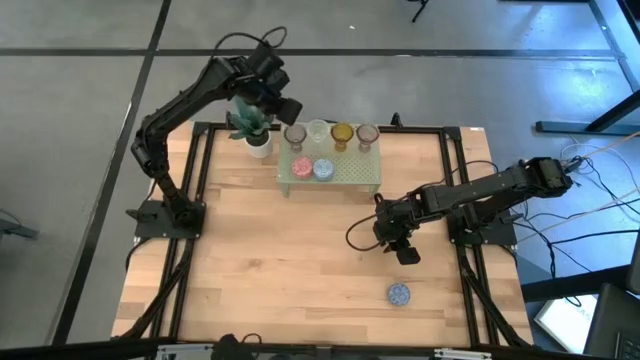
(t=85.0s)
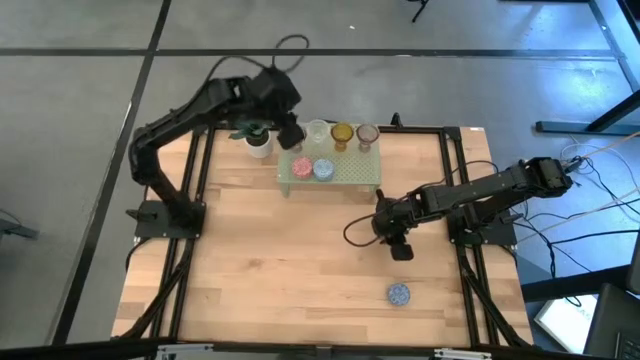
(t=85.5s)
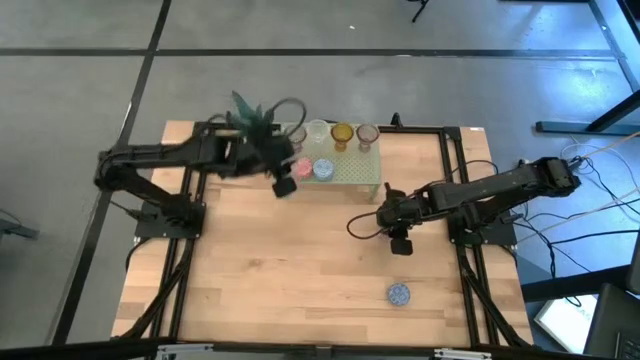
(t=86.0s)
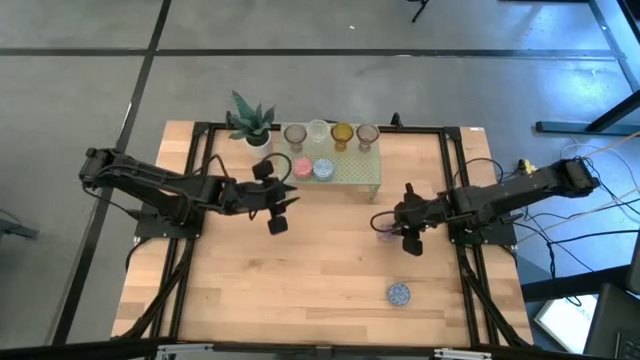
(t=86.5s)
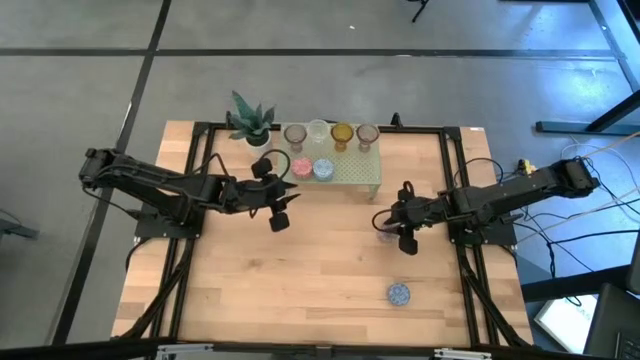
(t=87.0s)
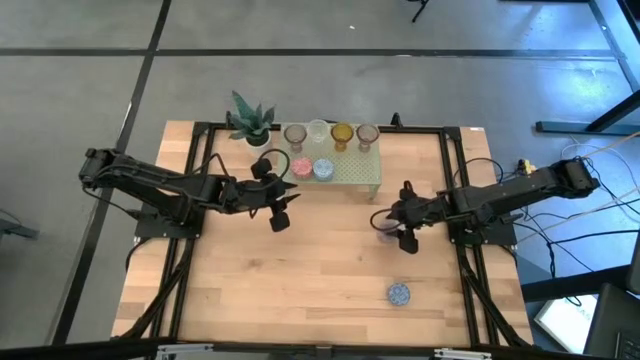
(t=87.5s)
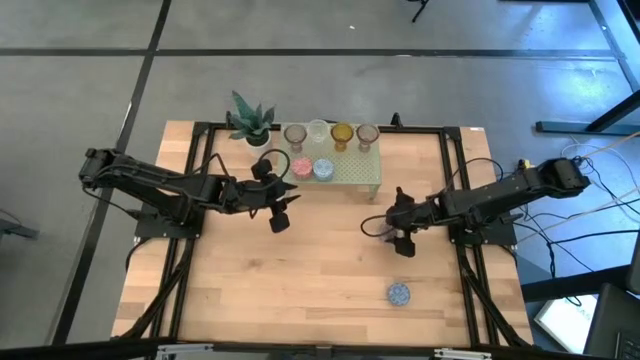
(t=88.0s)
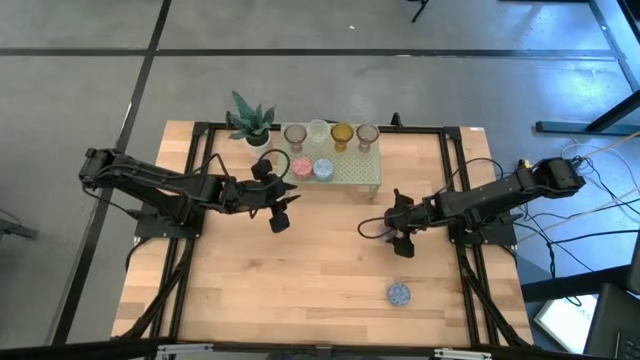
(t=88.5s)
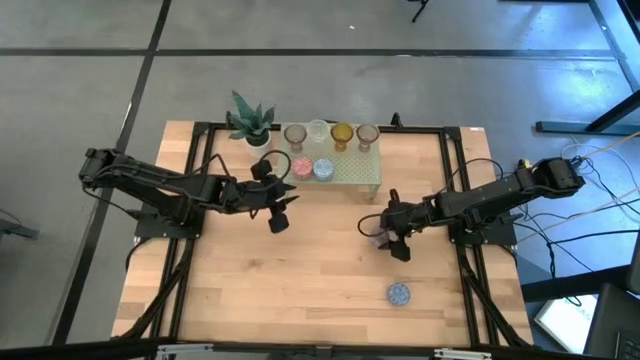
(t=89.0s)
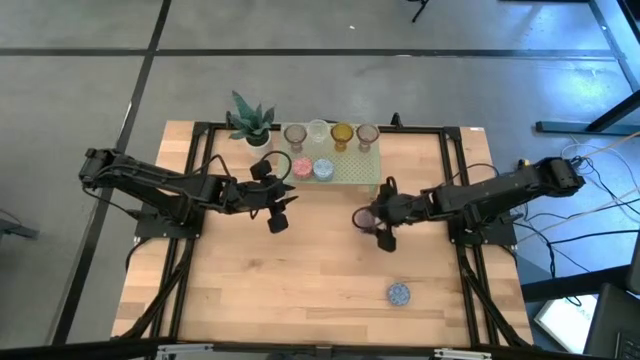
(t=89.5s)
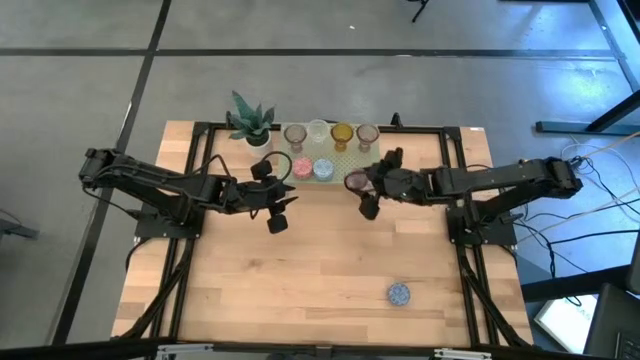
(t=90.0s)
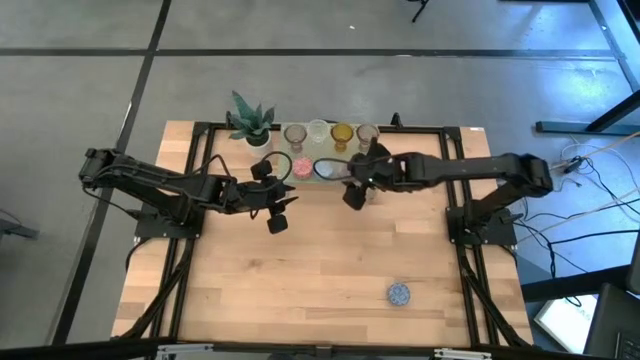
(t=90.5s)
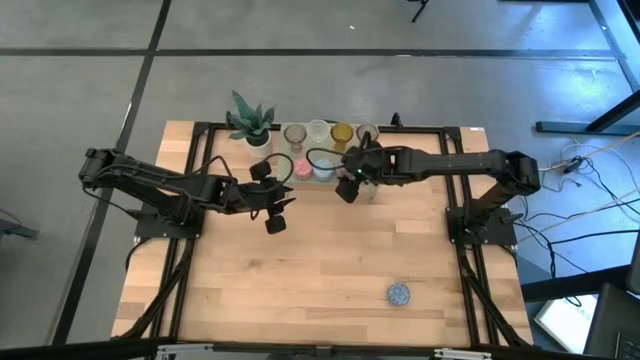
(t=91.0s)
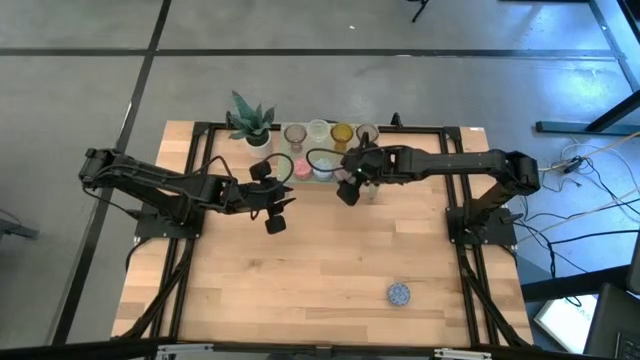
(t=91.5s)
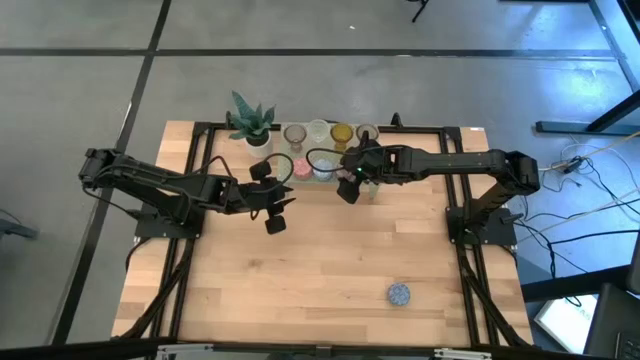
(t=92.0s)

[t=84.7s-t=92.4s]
Task: Pick & Place candle stick holders
Put the red scented candle on the shelf

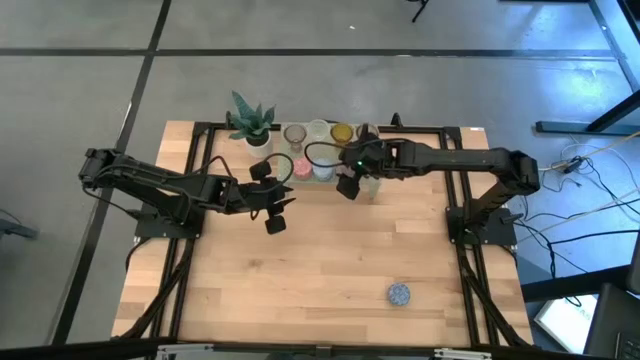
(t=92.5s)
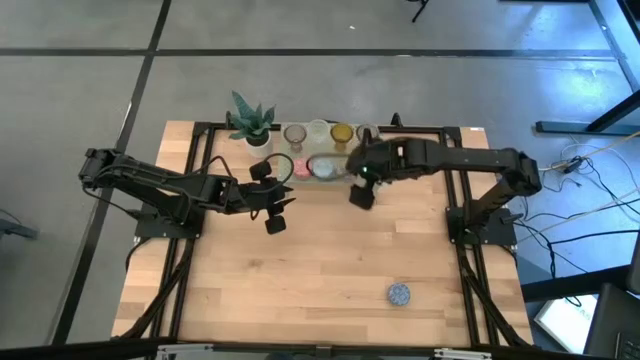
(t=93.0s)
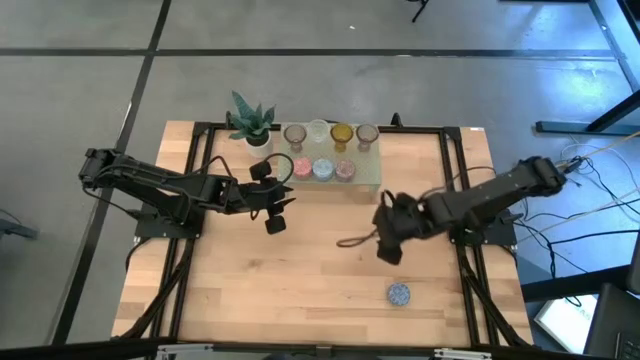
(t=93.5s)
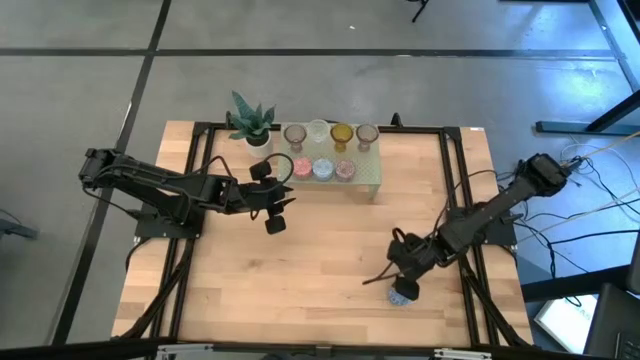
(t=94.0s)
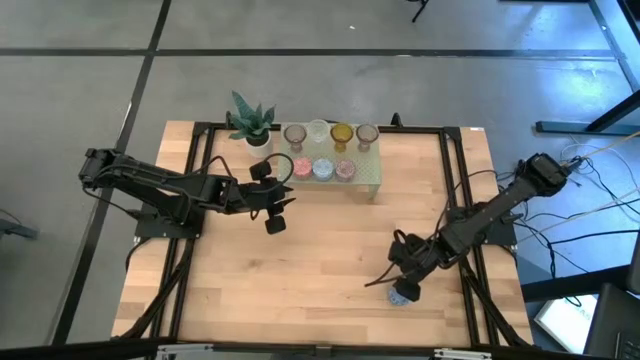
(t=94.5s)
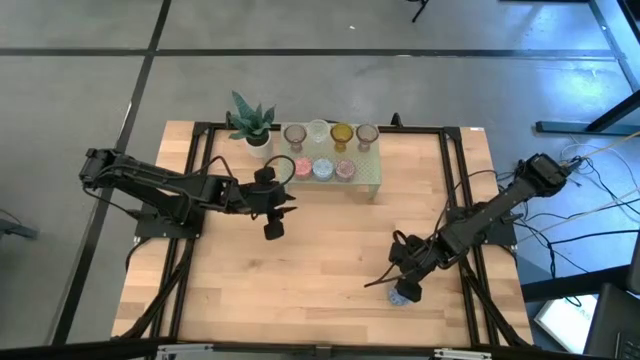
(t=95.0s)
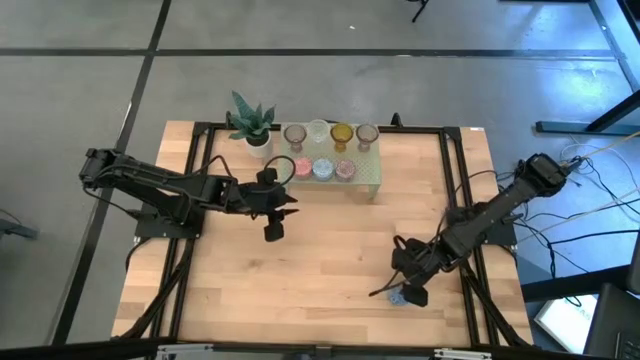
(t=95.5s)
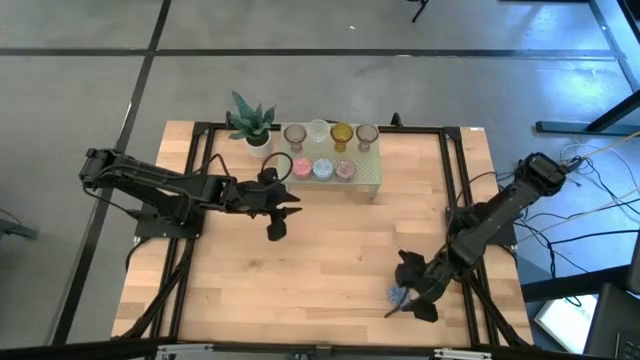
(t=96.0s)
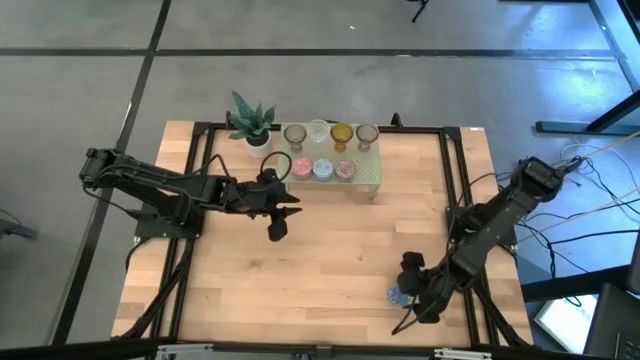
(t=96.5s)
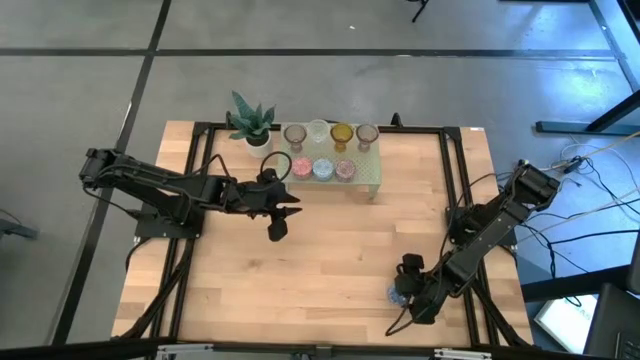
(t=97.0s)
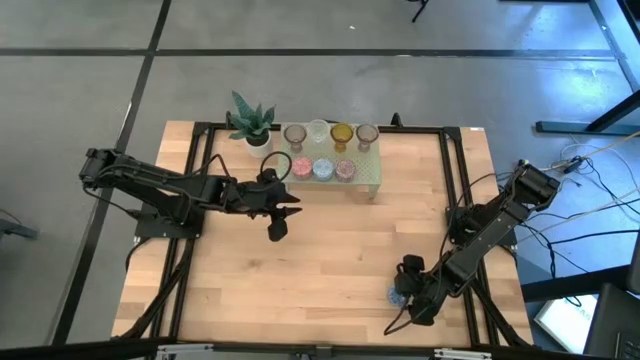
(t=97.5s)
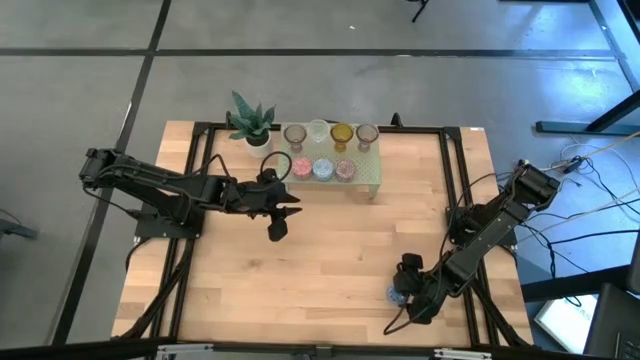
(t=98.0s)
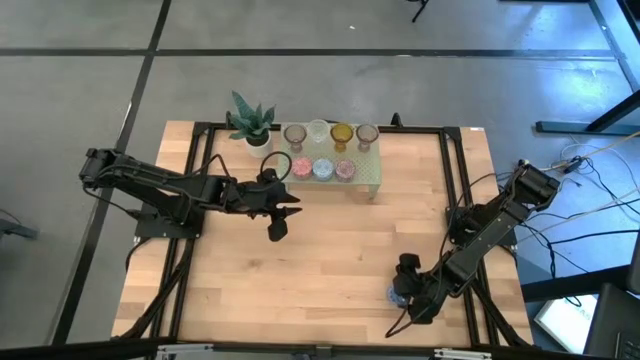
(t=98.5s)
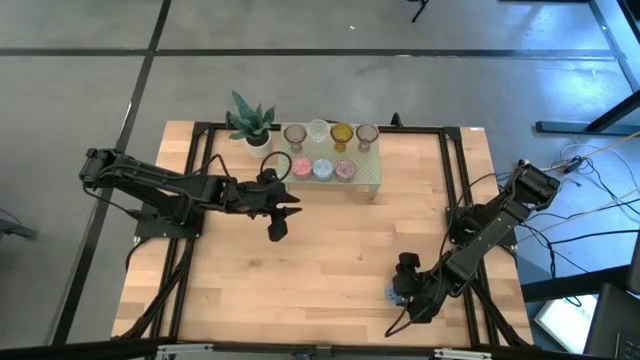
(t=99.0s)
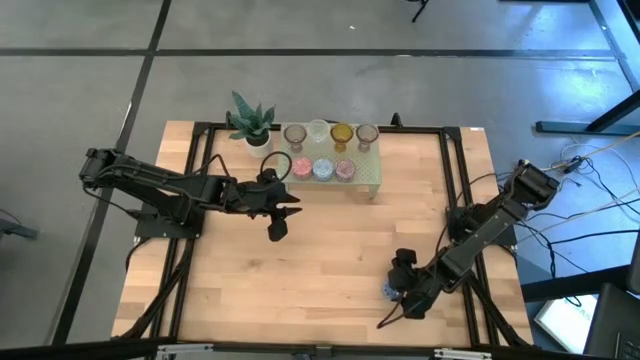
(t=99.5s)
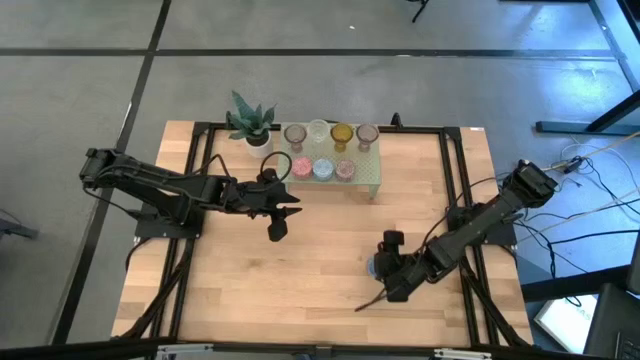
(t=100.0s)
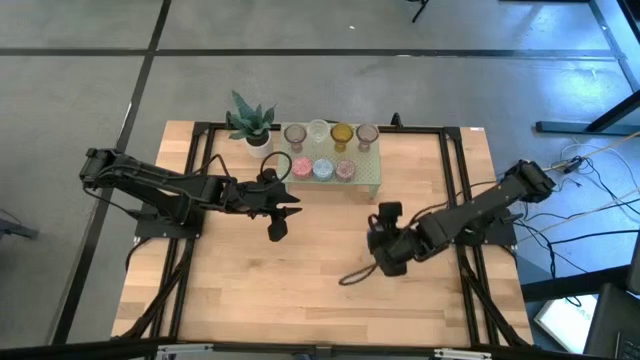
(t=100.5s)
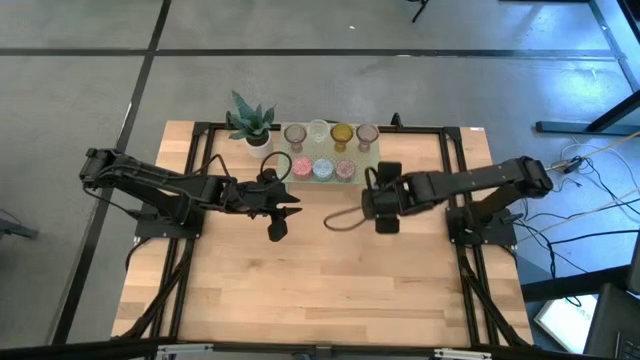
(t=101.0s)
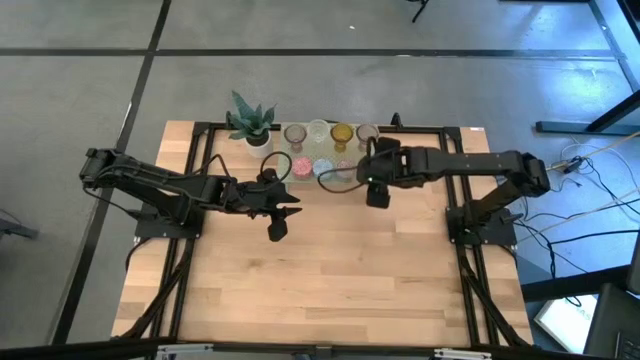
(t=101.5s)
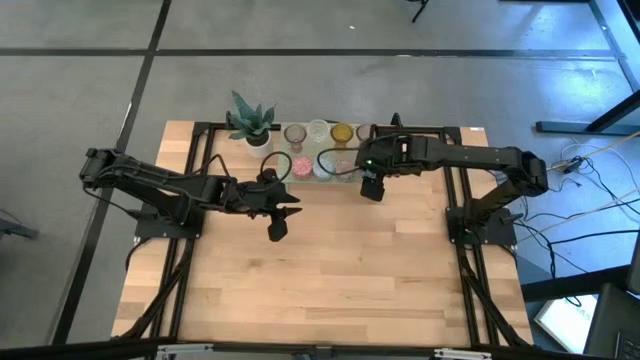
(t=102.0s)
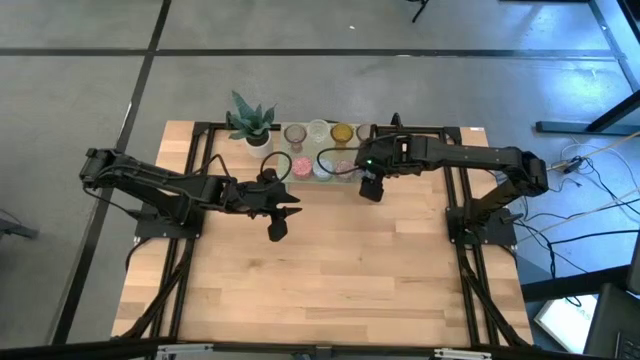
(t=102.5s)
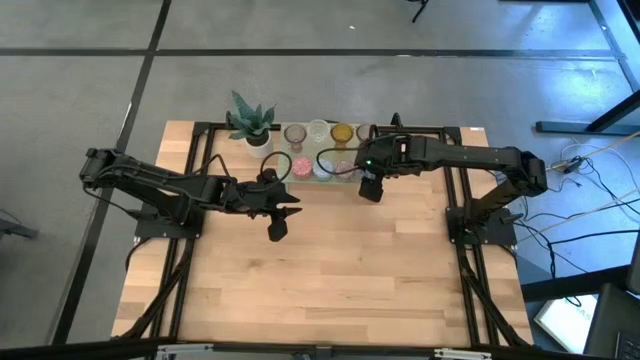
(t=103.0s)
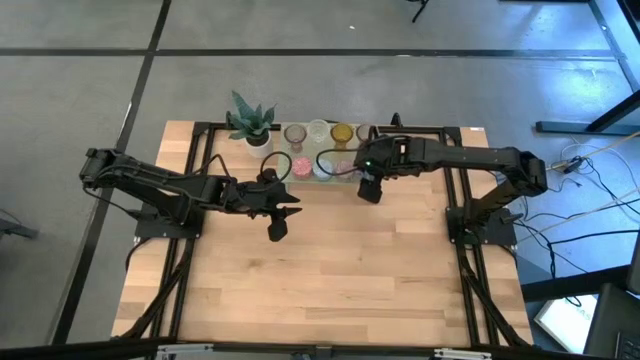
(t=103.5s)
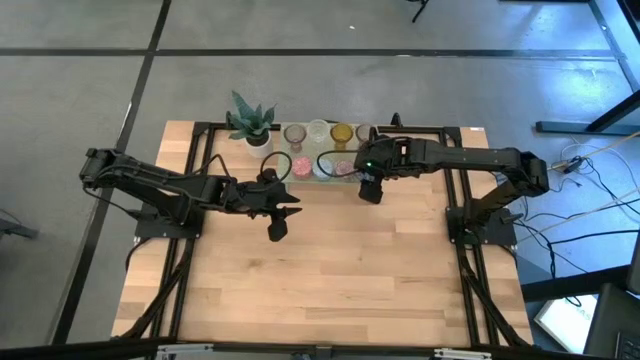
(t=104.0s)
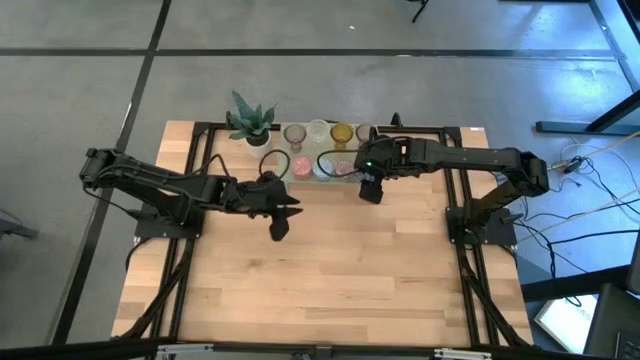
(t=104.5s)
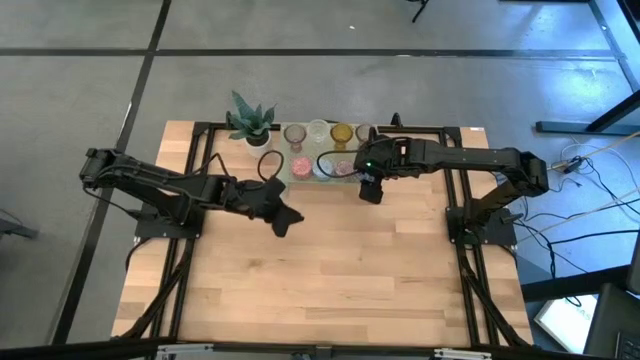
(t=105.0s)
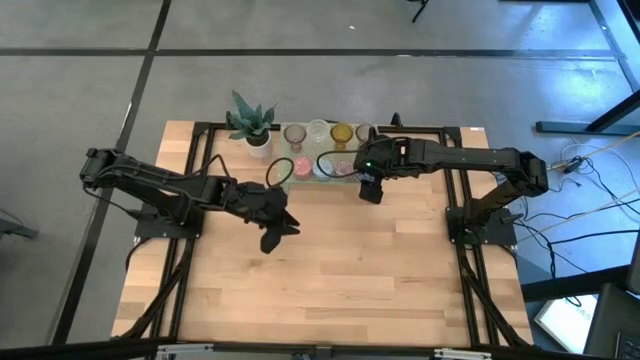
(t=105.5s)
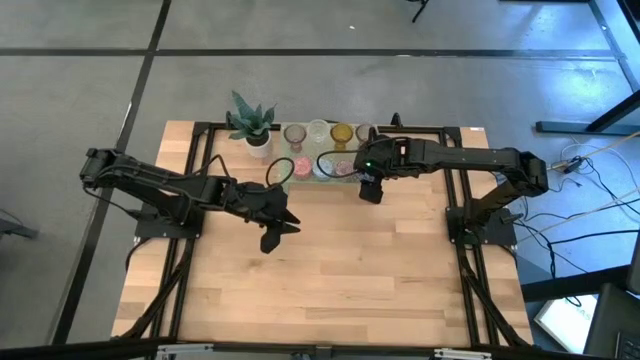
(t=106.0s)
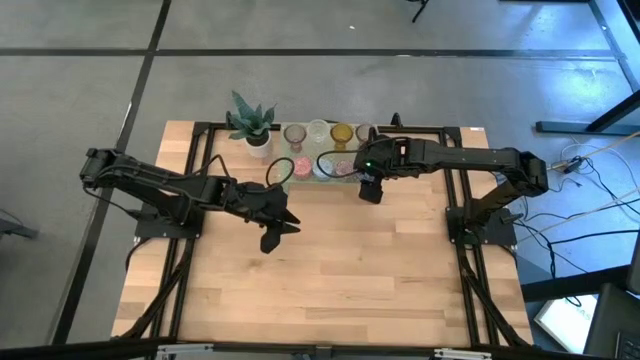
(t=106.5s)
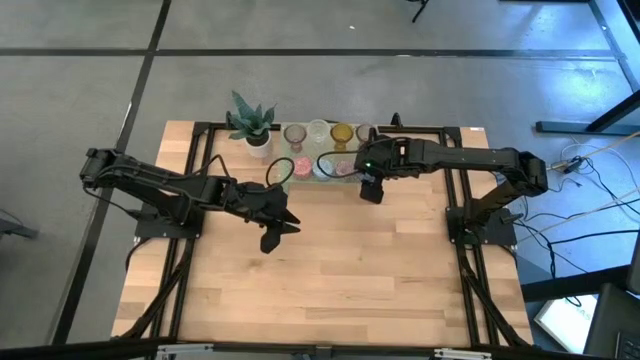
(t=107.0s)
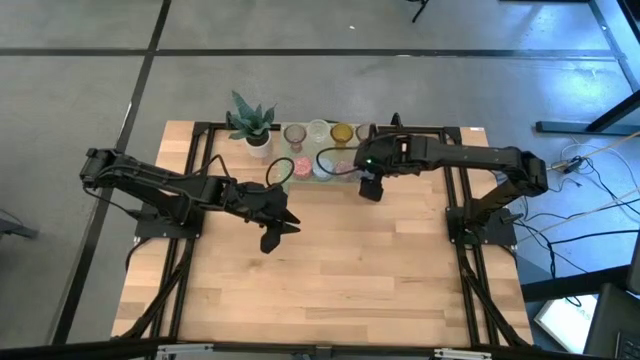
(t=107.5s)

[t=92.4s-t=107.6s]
Put the blue scented candle on the shelf
